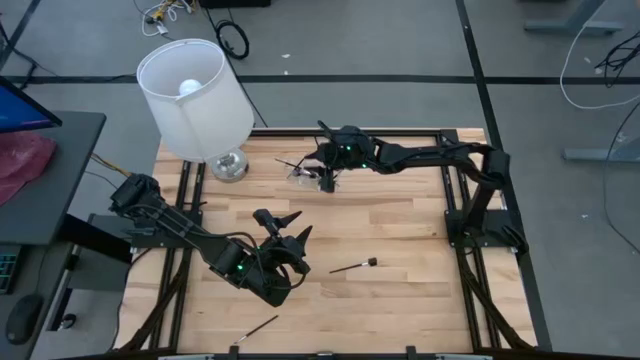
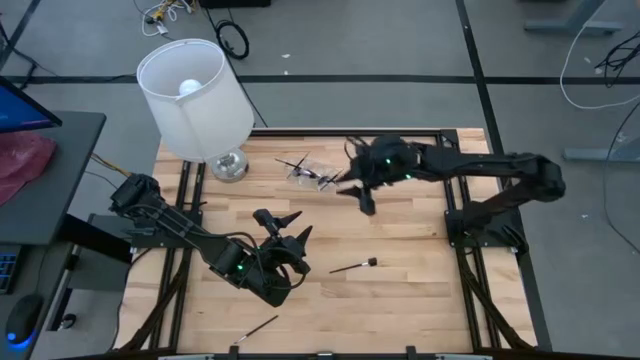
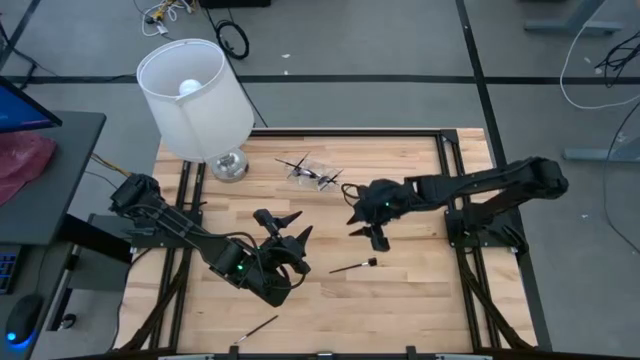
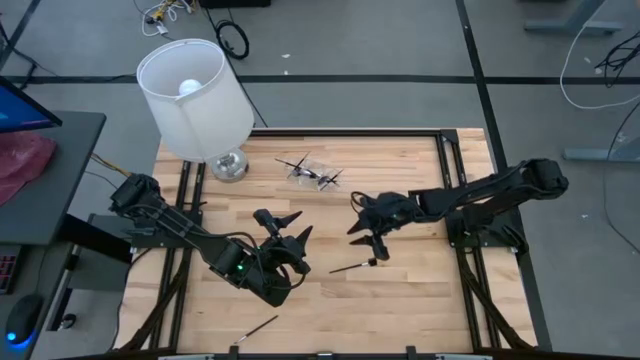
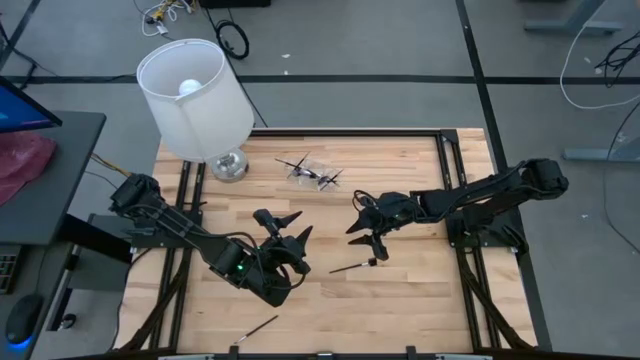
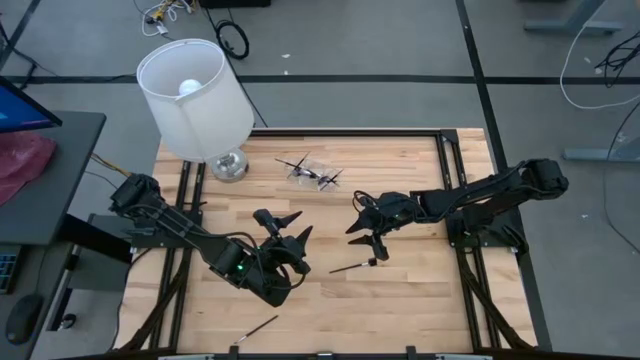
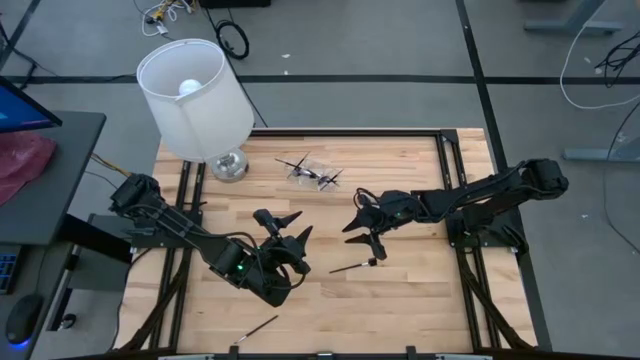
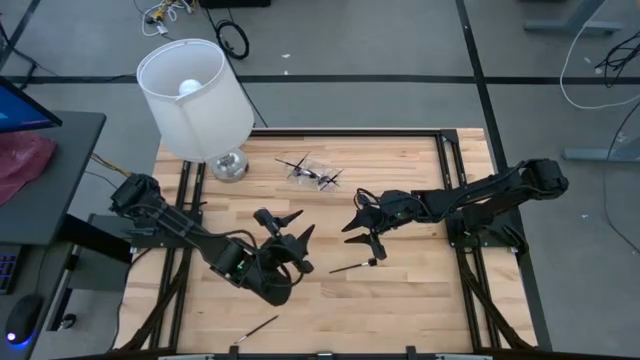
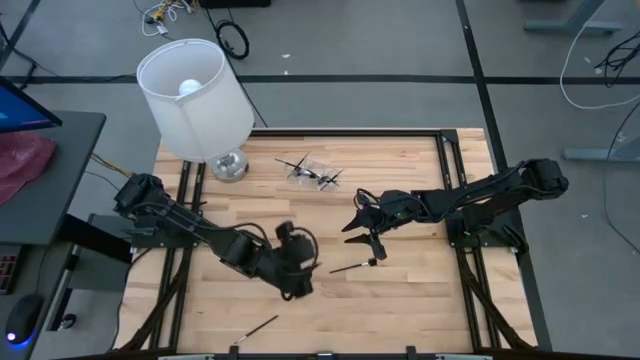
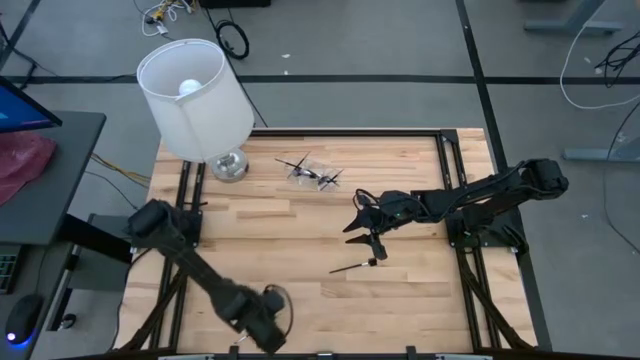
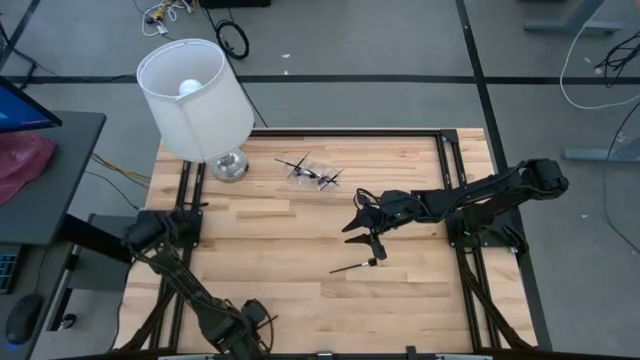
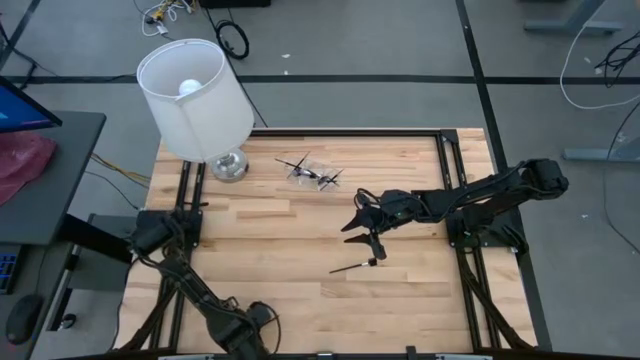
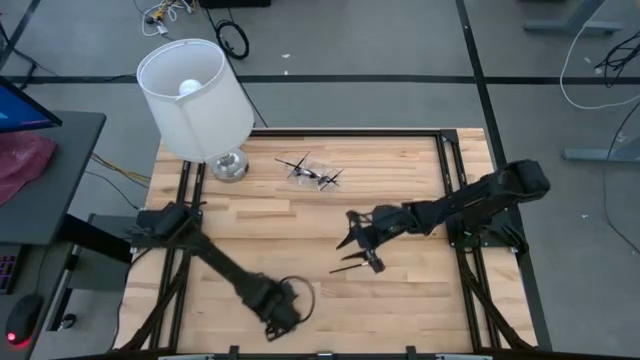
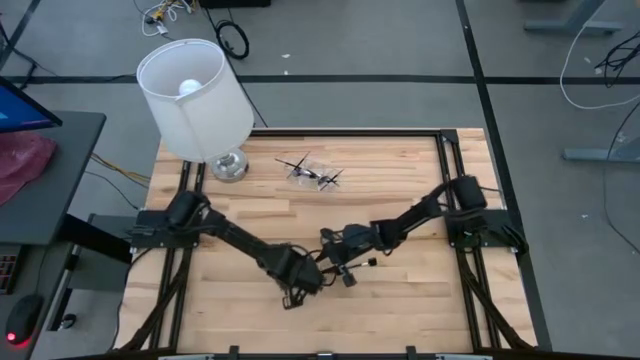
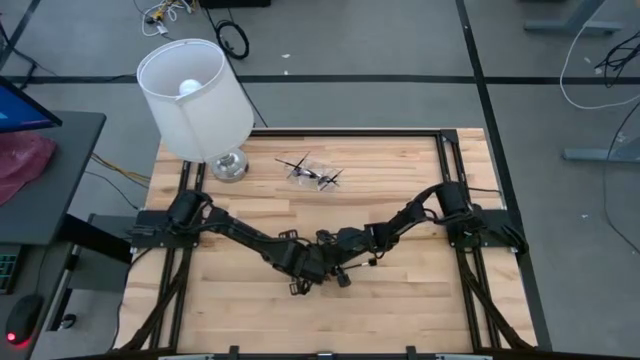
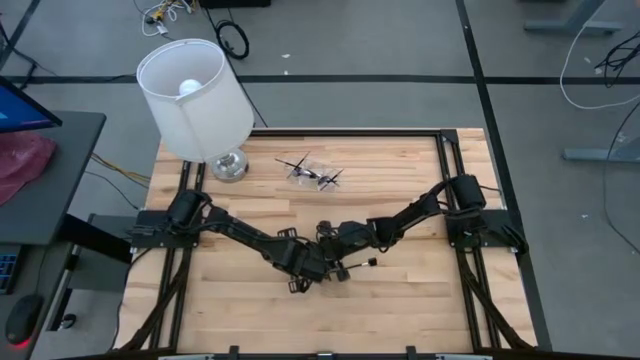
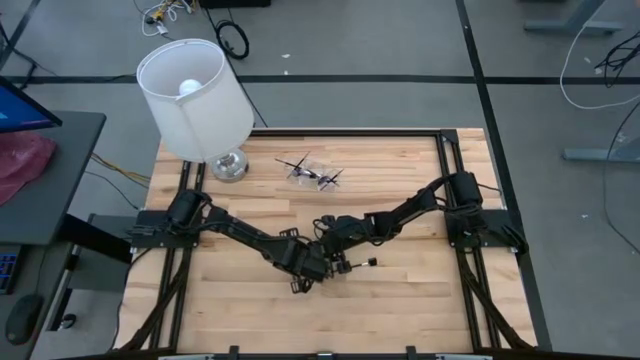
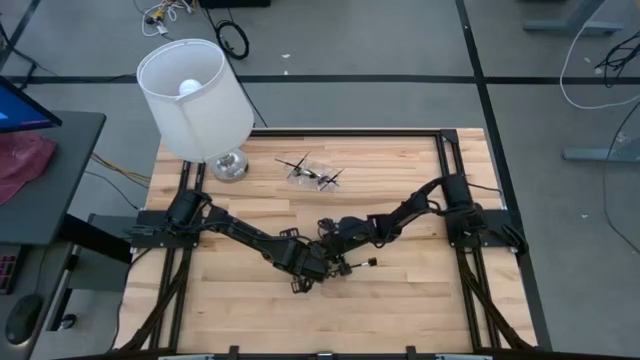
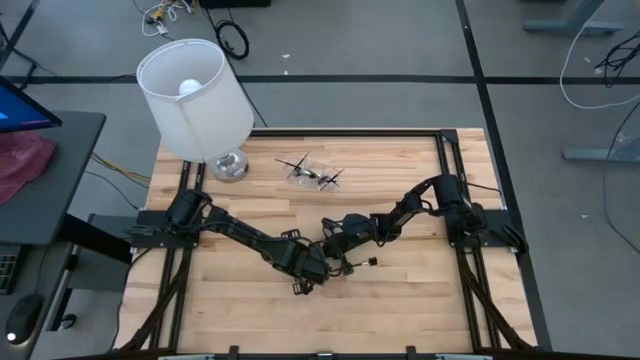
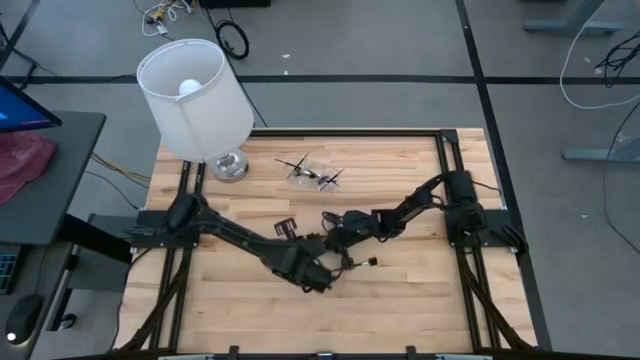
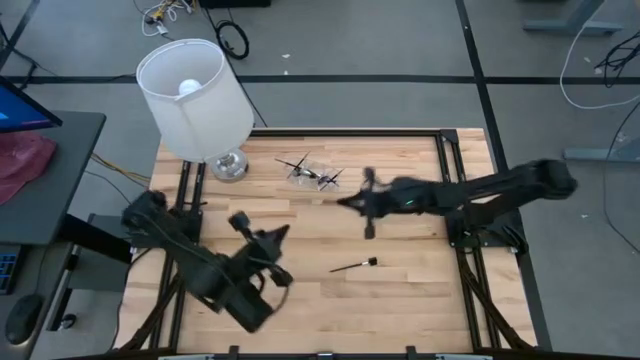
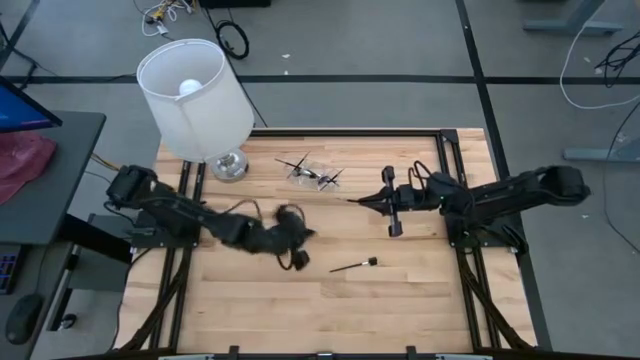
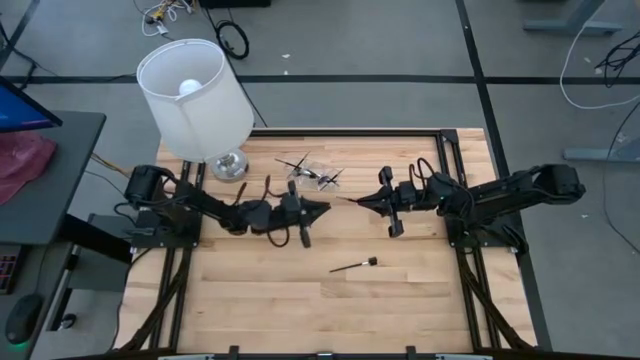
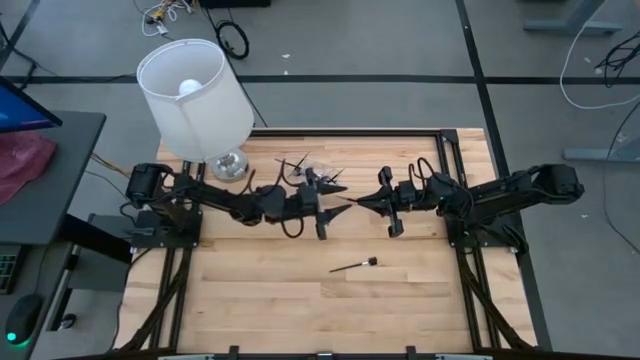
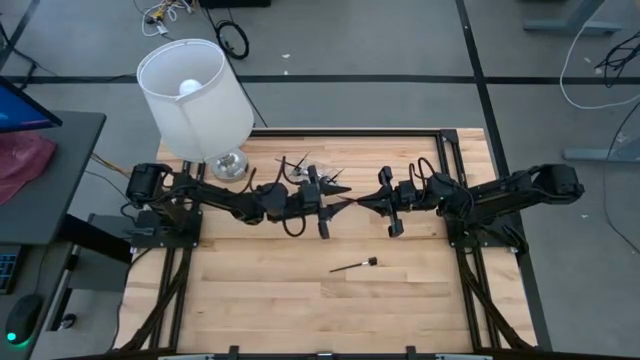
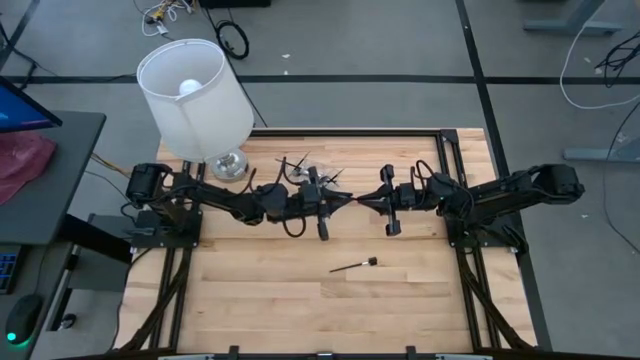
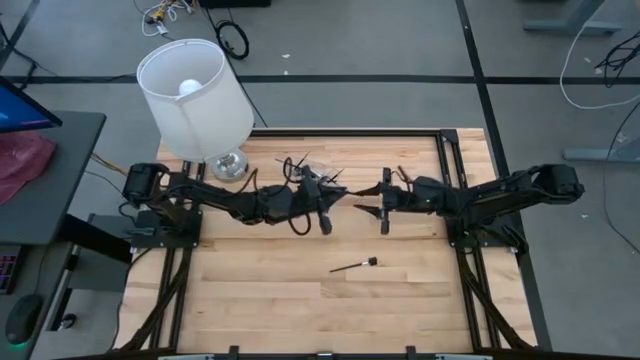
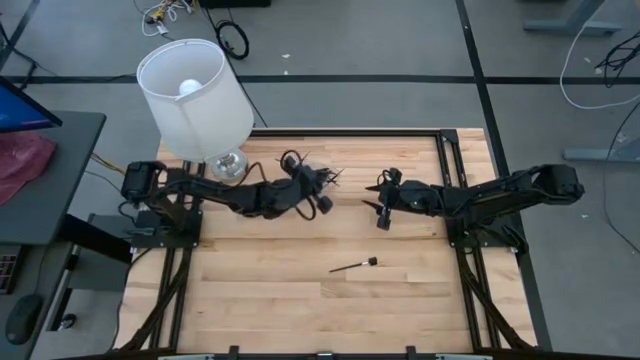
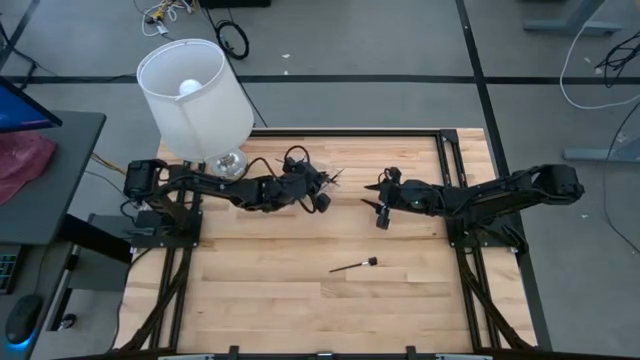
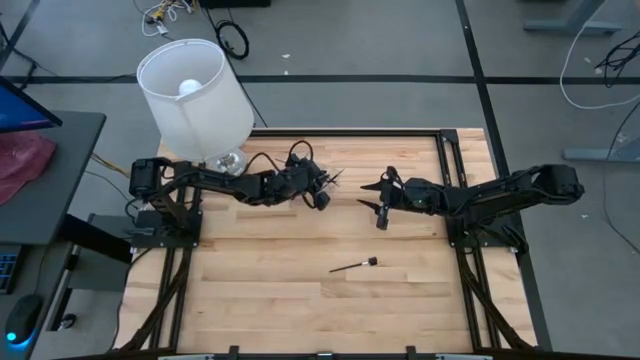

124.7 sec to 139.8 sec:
Task: Put items in baskets/containers
Put the black eyeshadow brush into the transparent organizer

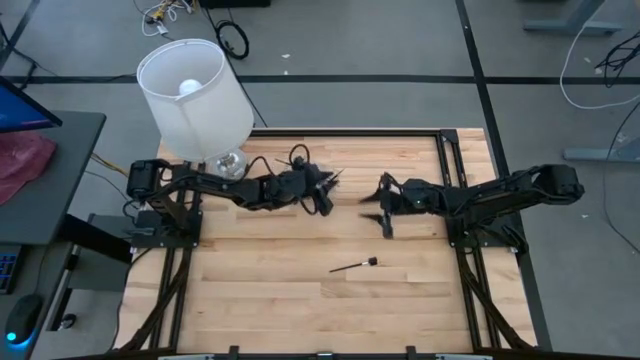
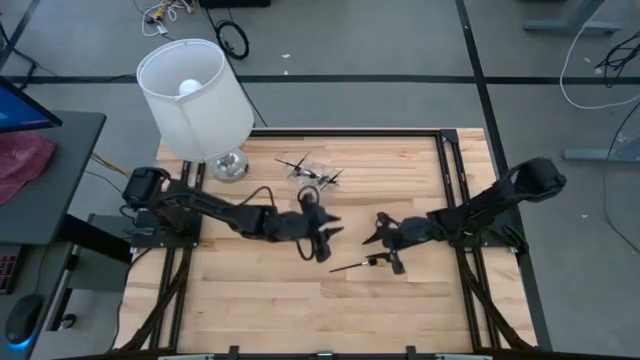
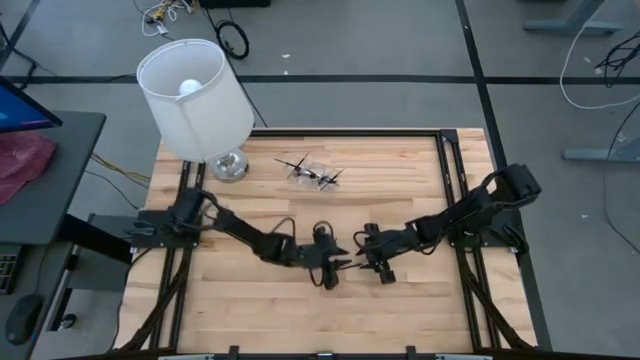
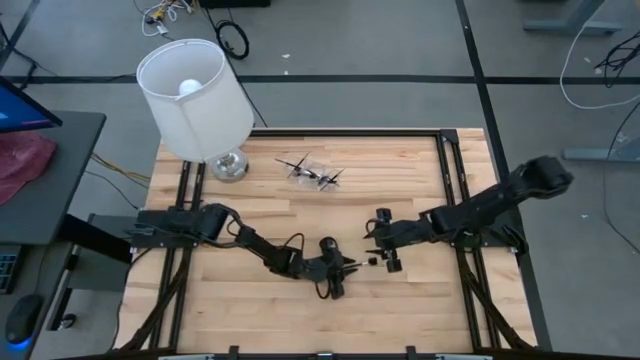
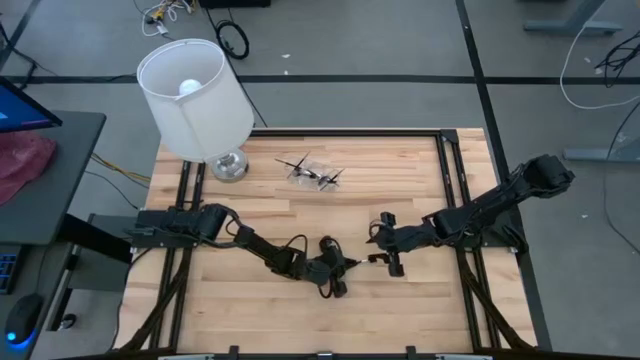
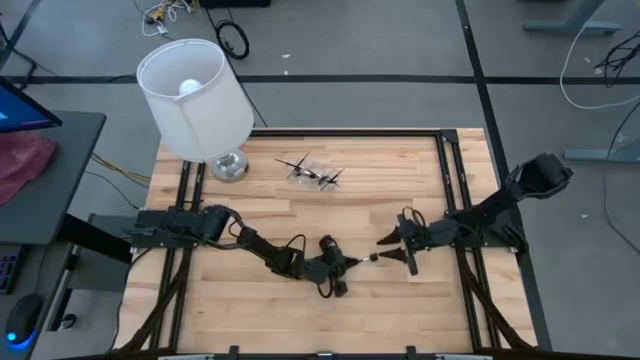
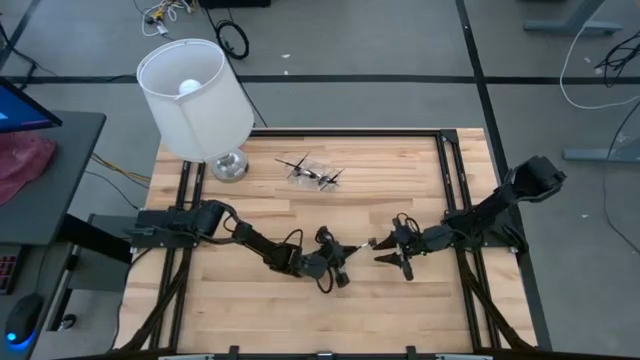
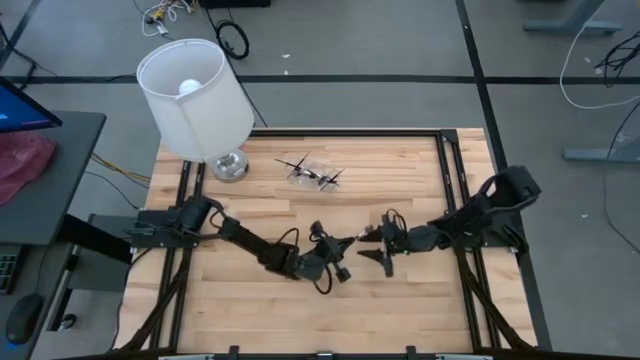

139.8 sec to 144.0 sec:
Put the black eyebrow brush into the transparent organizer

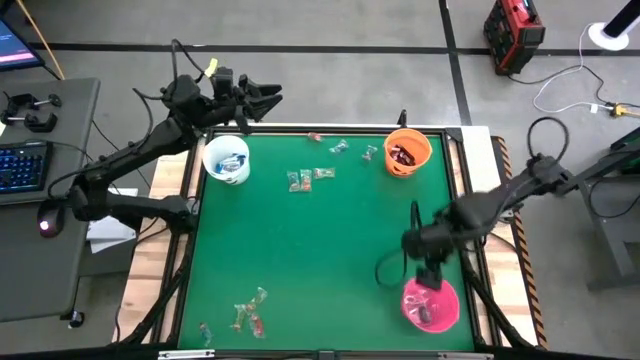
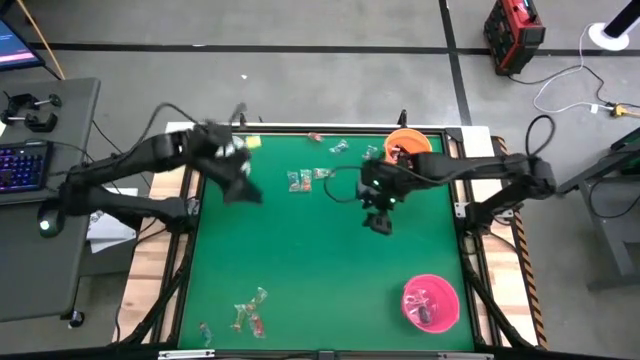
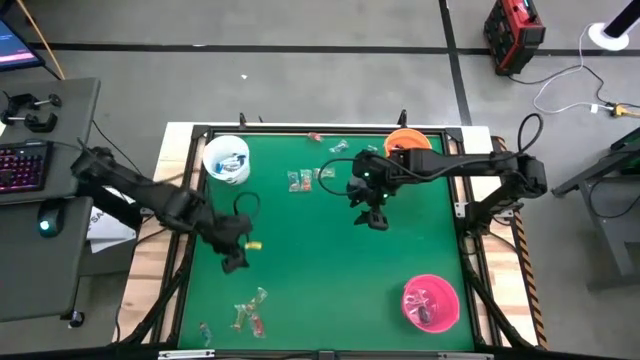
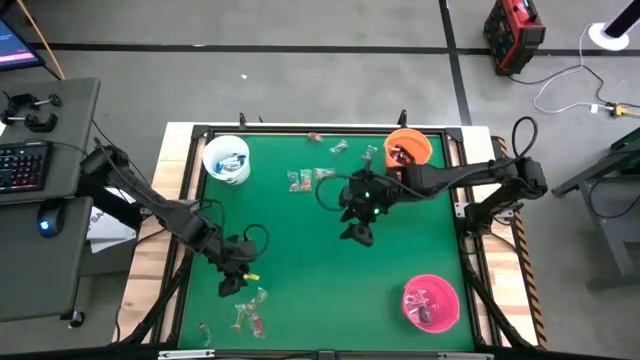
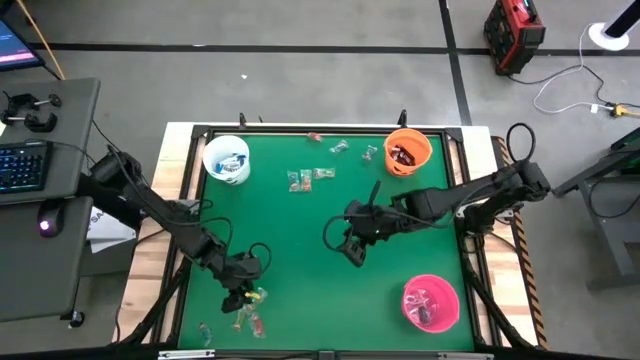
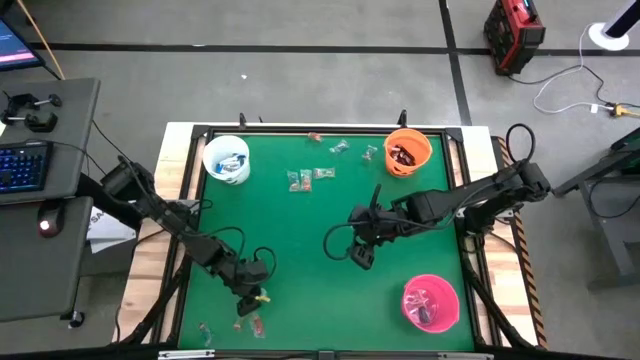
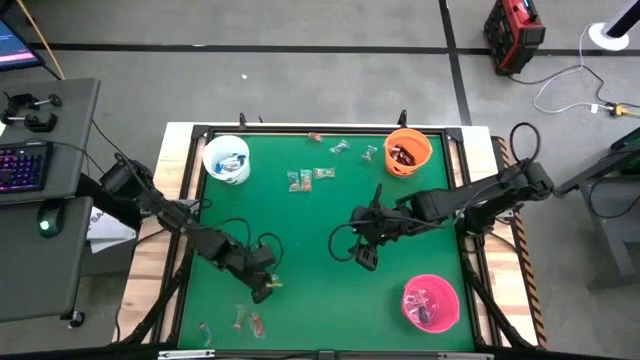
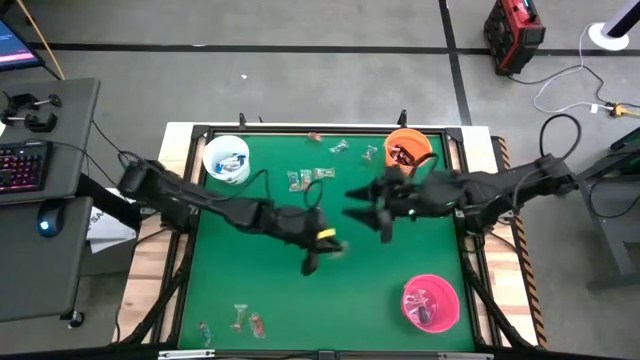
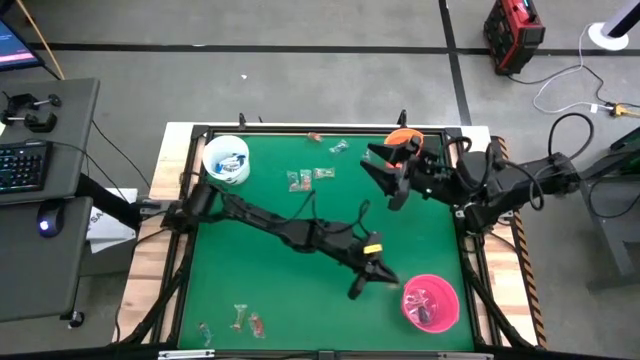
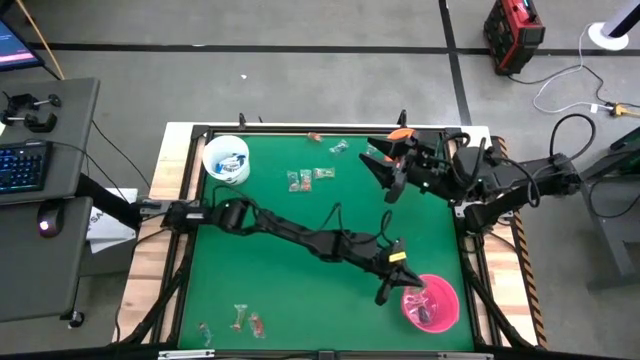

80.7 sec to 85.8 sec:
Task: Sort candy by brand, put in halloween buckets
Put the green gummy into the pink bucket
